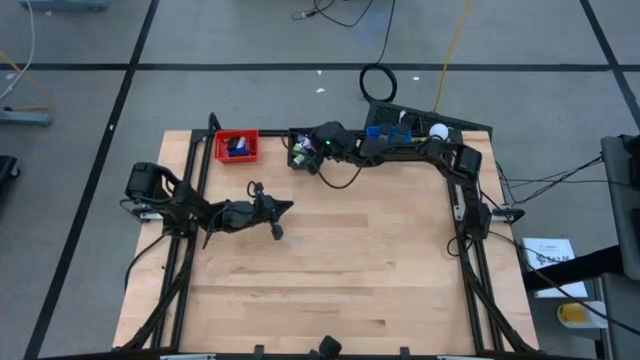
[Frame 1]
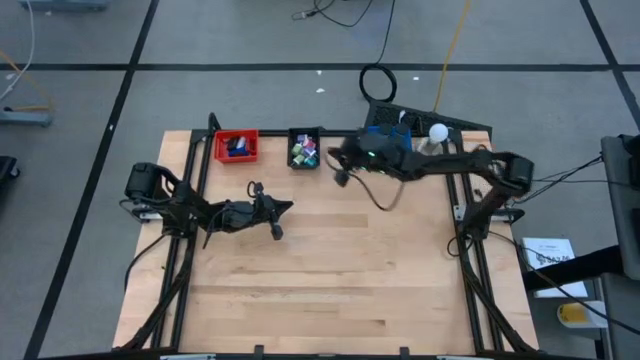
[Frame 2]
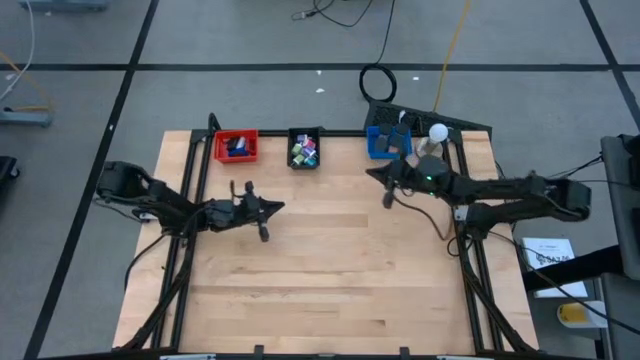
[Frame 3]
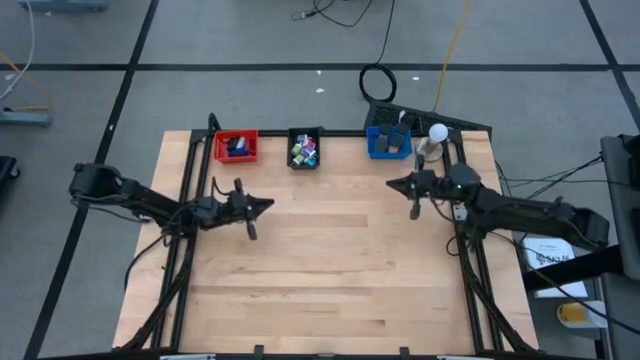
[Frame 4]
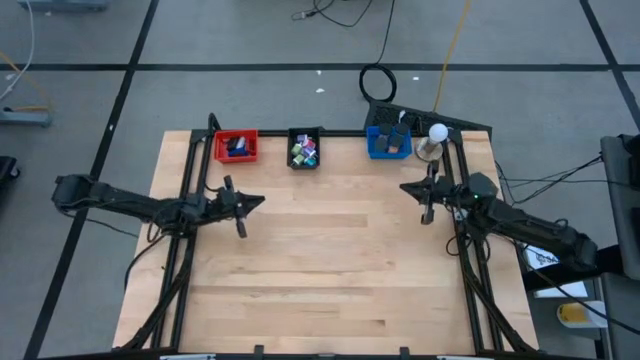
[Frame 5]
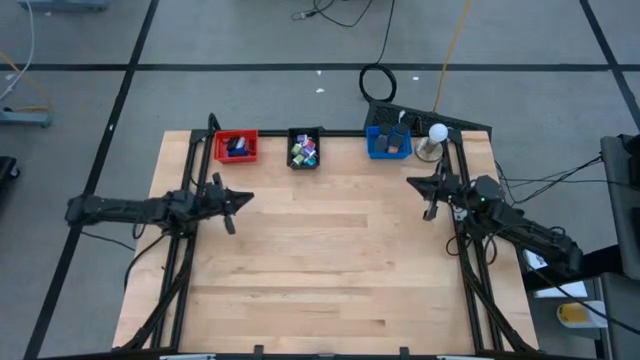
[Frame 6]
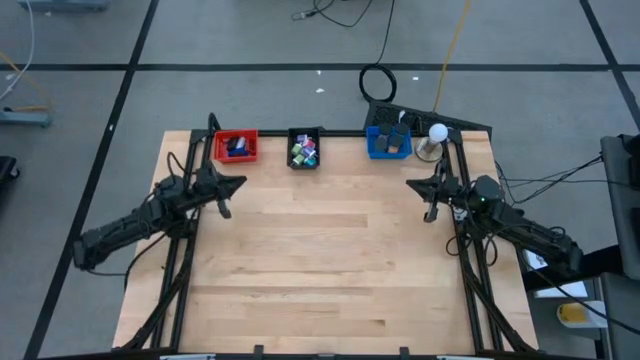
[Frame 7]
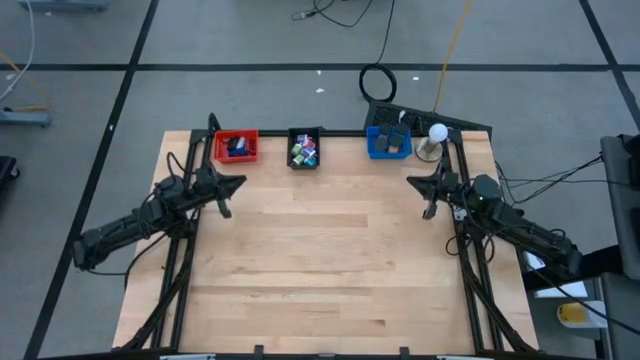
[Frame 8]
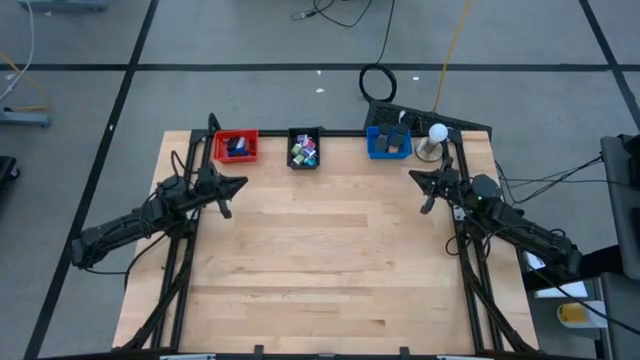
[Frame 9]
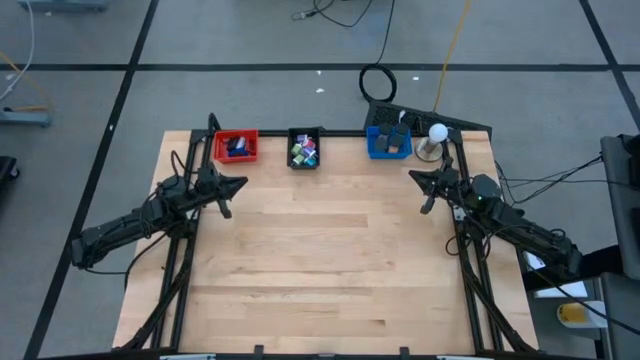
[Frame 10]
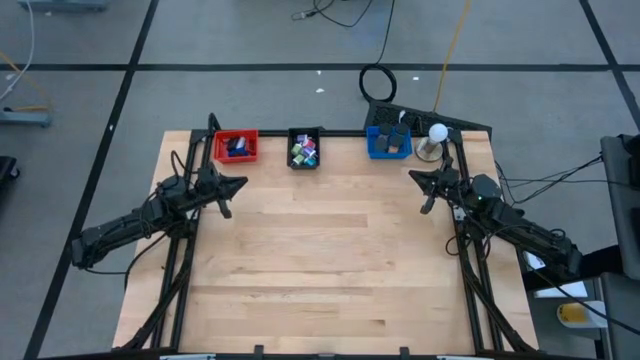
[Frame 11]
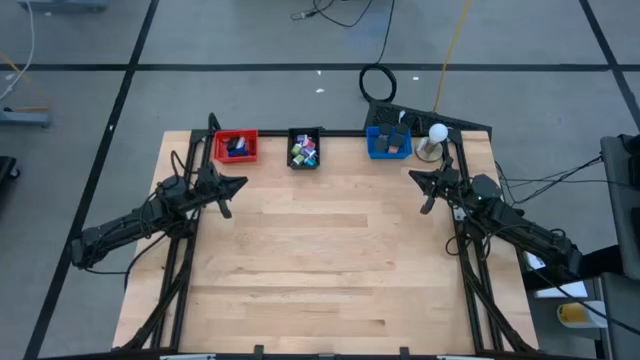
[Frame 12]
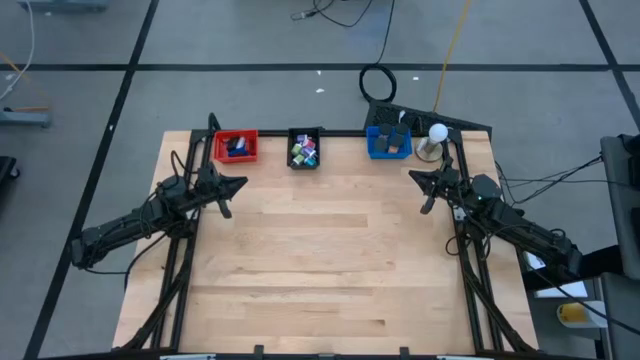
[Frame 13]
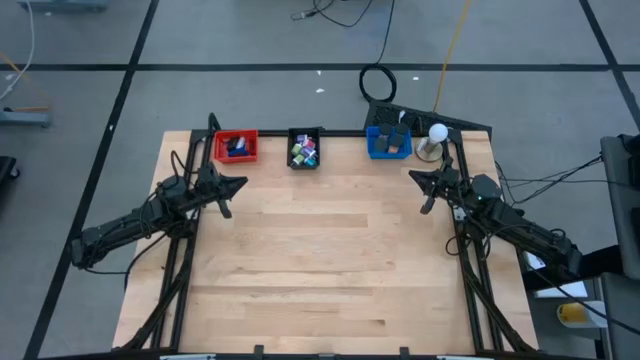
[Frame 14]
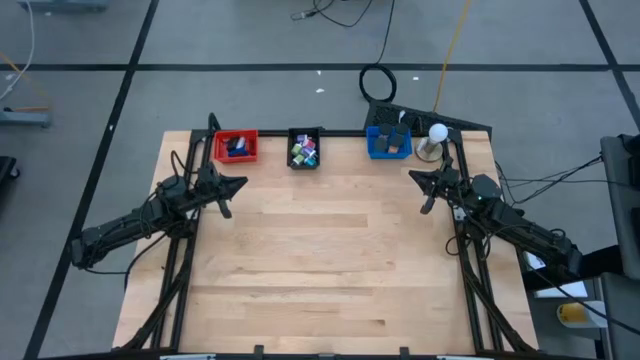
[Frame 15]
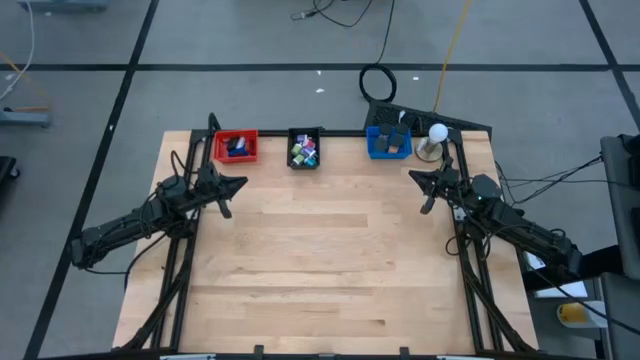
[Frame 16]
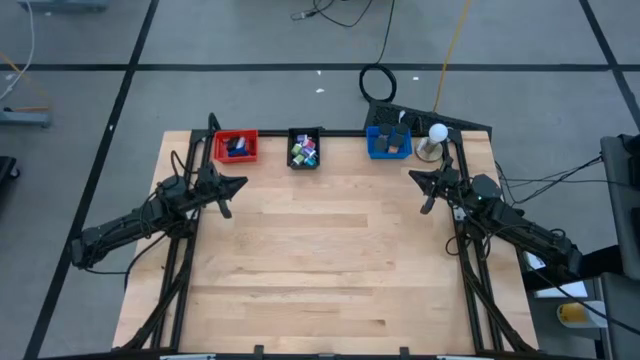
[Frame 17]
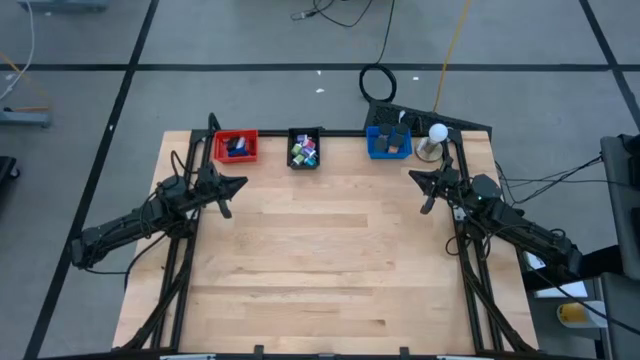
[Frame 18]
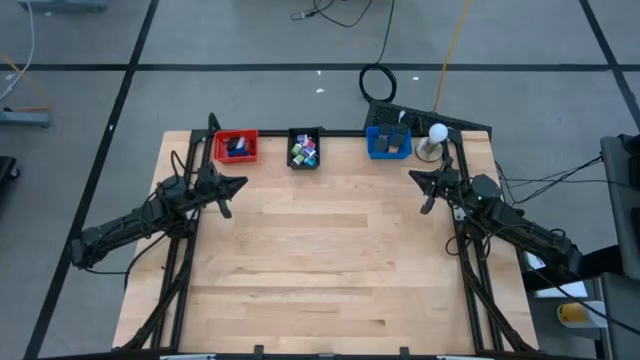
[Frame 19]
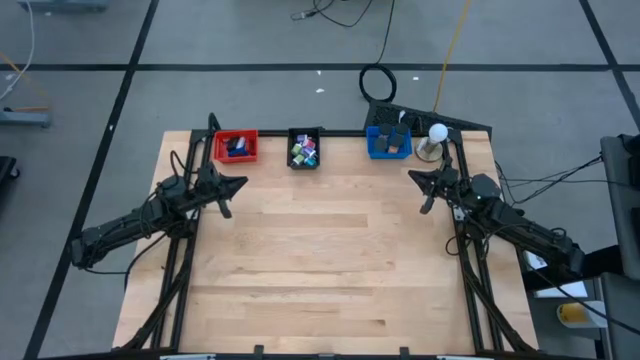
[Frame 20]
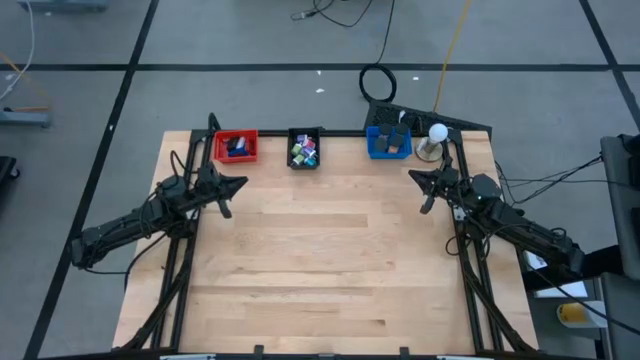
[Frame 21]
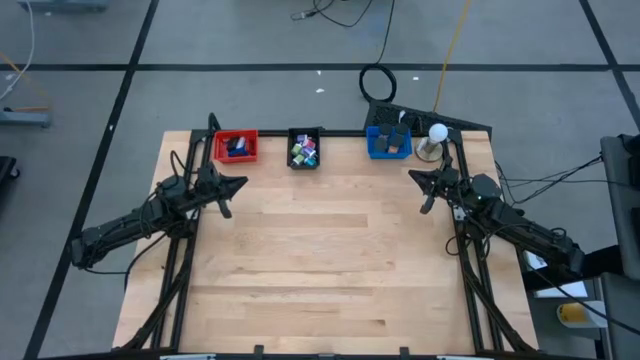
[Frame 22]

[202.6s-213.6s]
Task: Pick & Place Office items
Return to home position

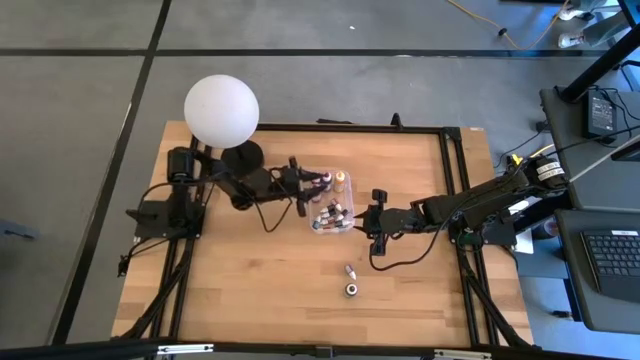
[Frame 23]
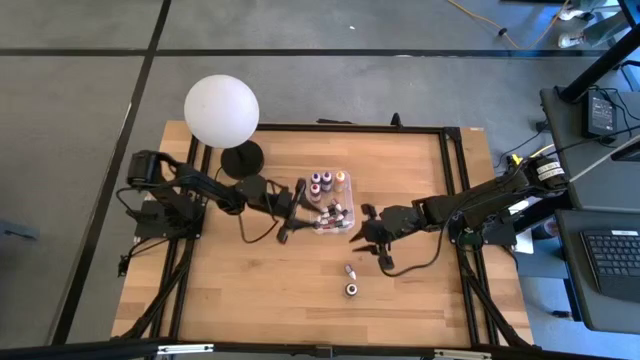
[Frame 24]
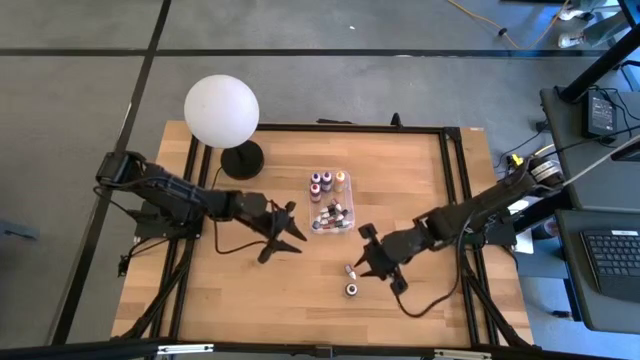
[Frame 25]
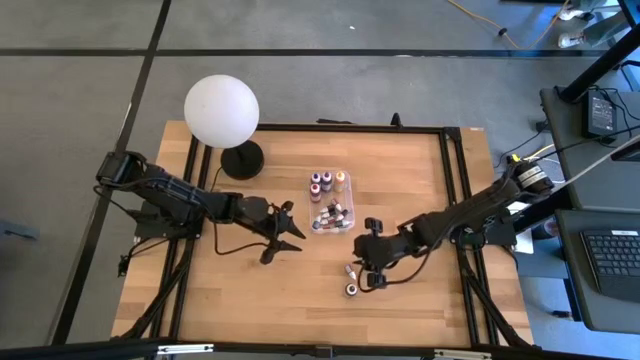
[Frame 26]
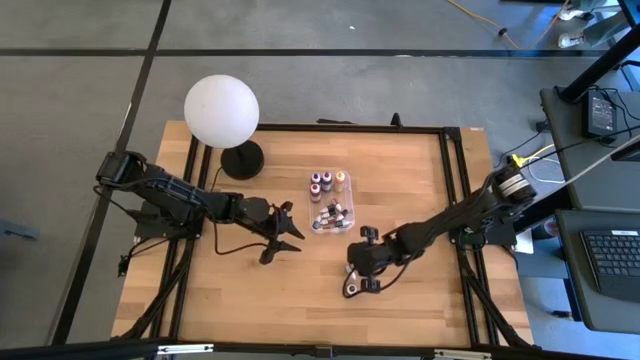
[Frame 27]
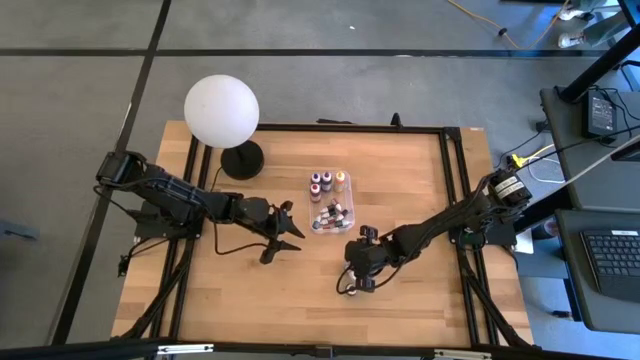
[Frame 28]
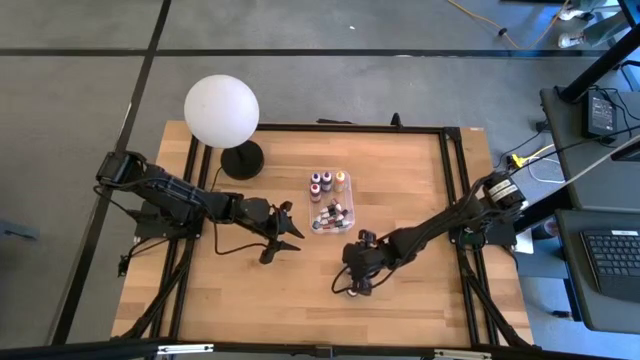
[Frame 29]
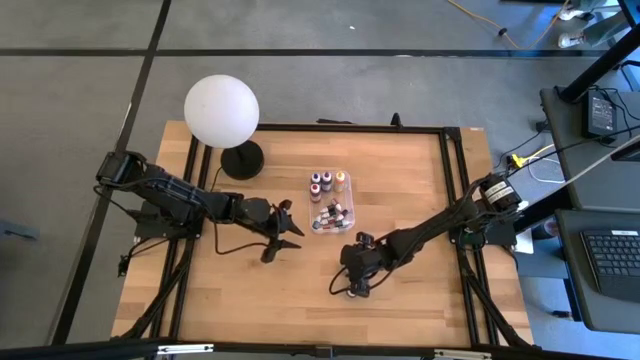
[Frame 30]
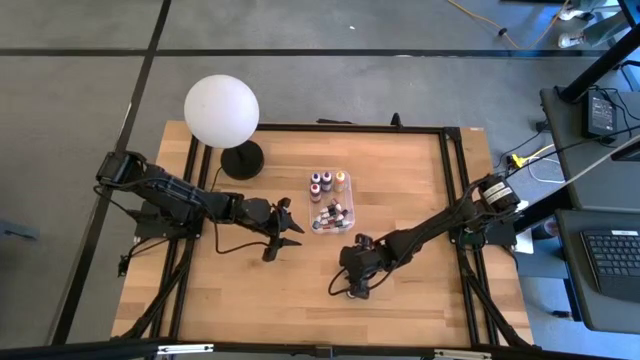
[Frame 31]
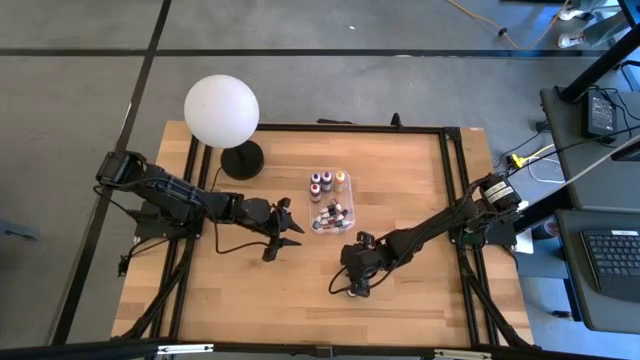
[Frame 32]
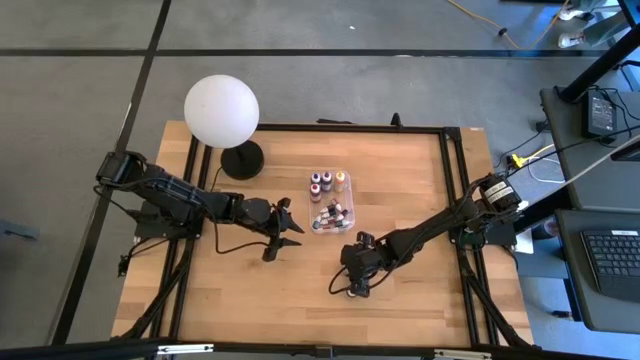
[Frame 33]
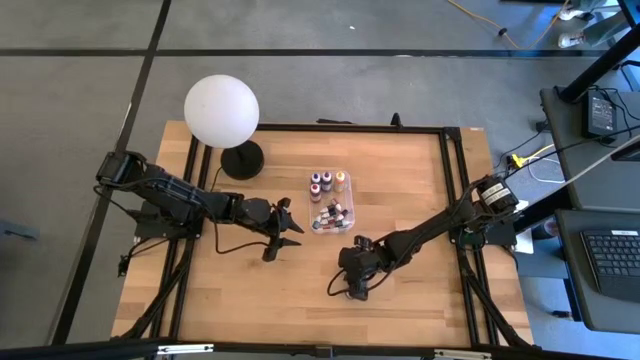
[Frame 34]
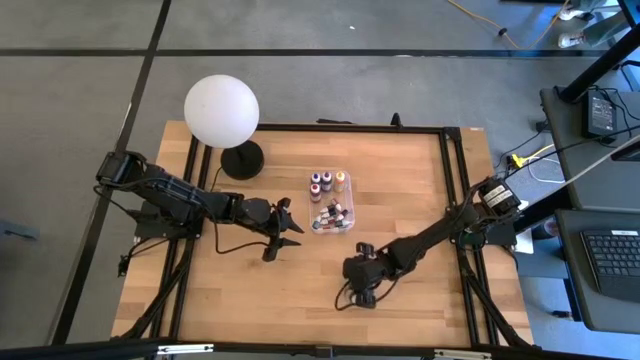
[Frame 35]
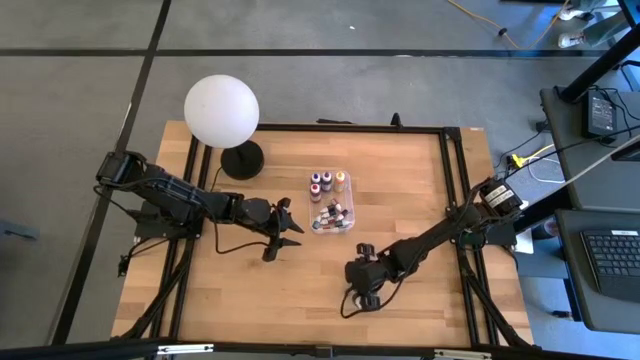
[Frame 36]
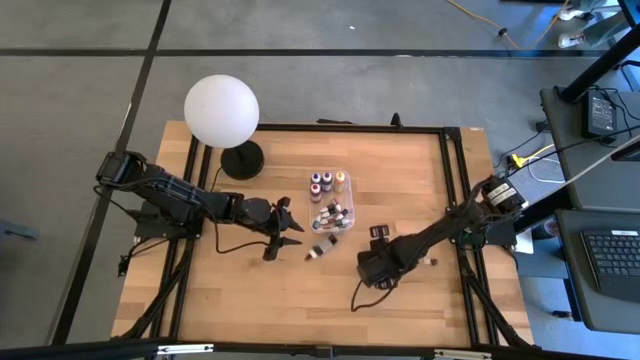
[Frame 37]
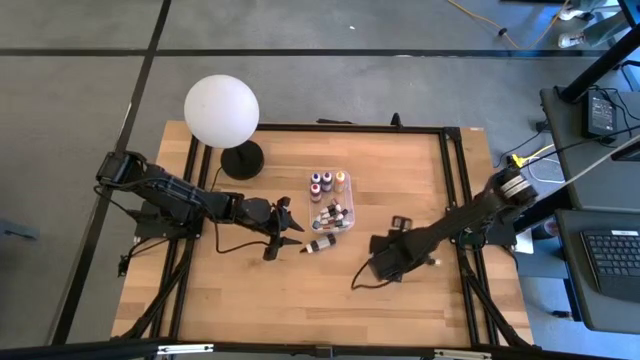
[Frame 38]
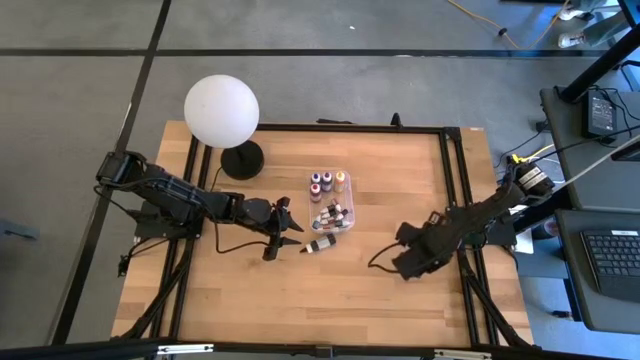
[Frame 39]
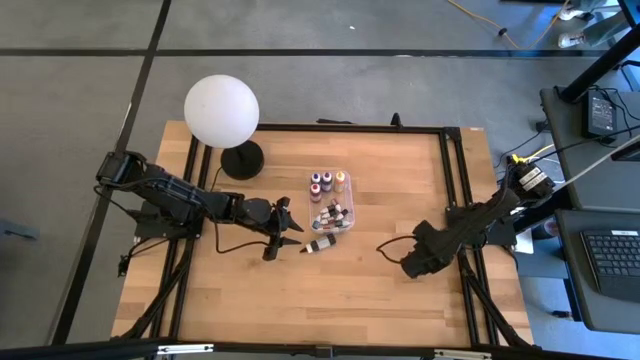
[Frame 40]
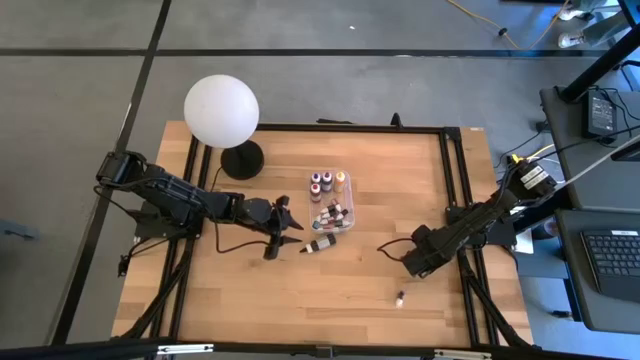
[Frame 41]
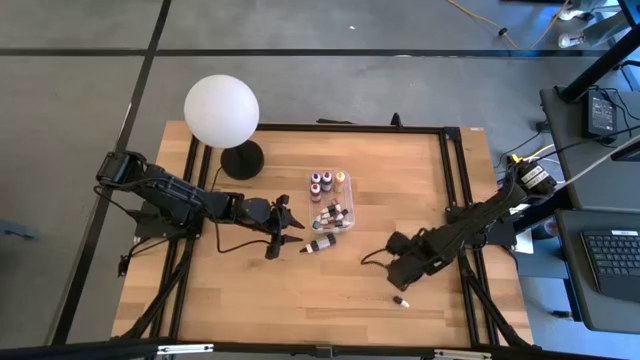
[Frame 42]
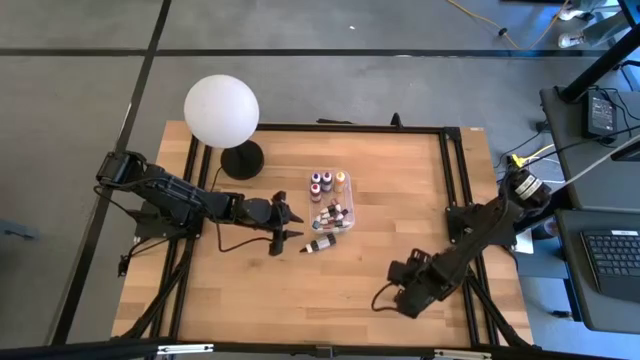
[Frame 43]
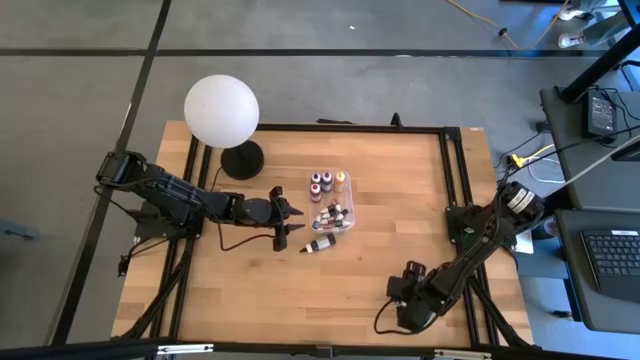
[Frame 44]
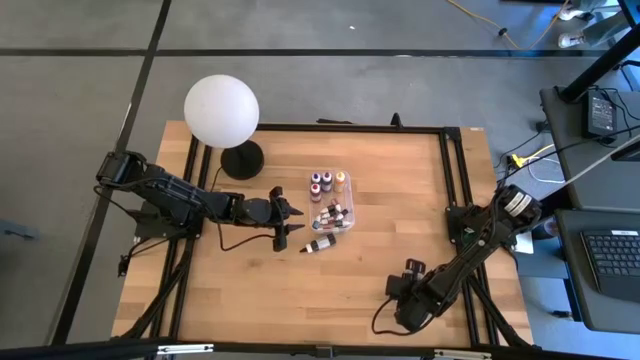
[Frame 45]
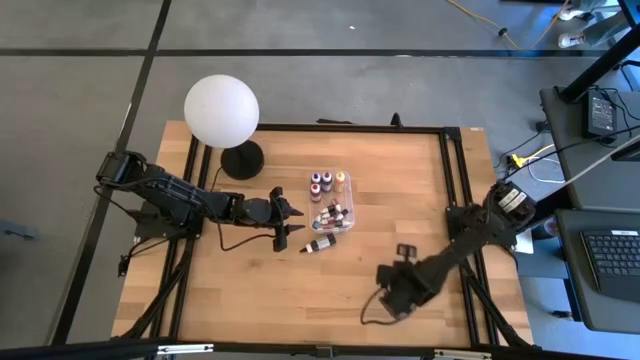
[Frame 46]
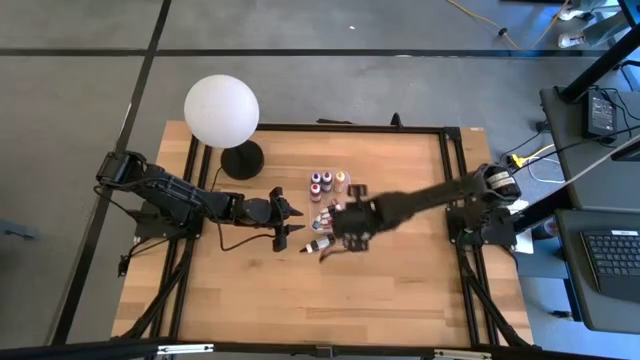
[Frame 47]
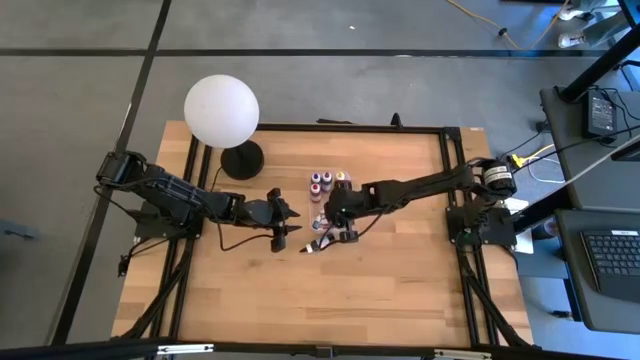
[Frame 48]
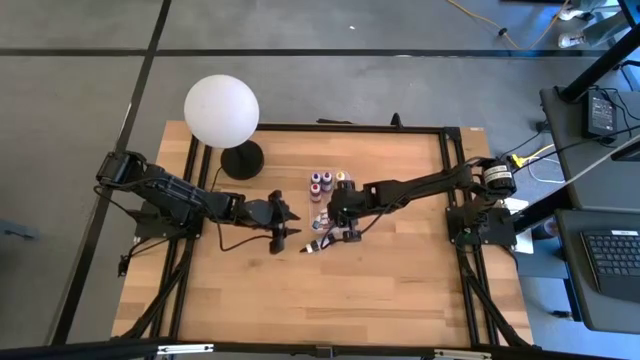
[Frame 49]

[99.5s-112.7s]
Task: Pick & Place food coloring
Put the small purple food coloring bottle in the transparent bin
